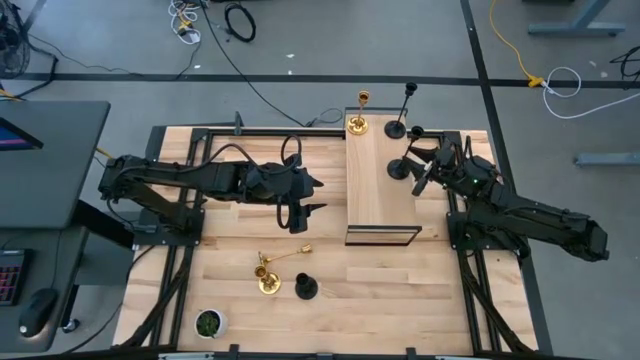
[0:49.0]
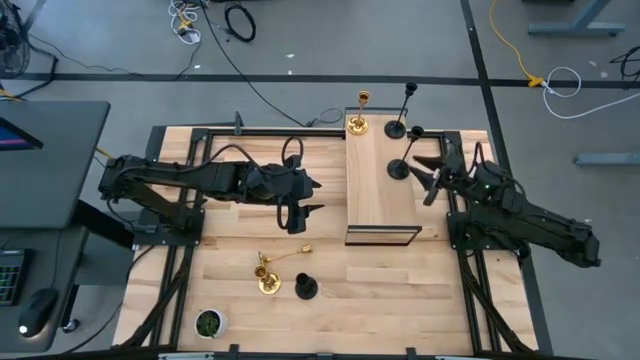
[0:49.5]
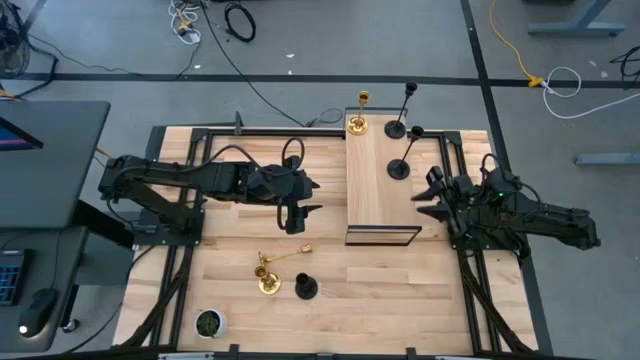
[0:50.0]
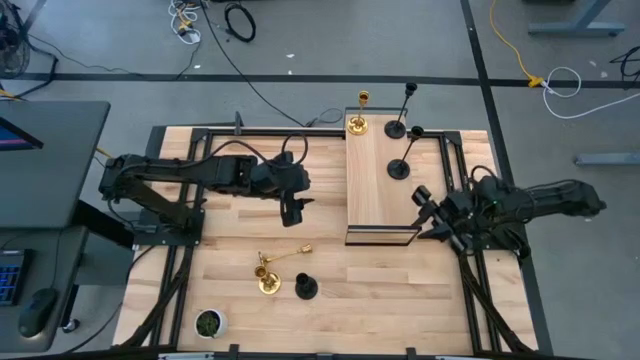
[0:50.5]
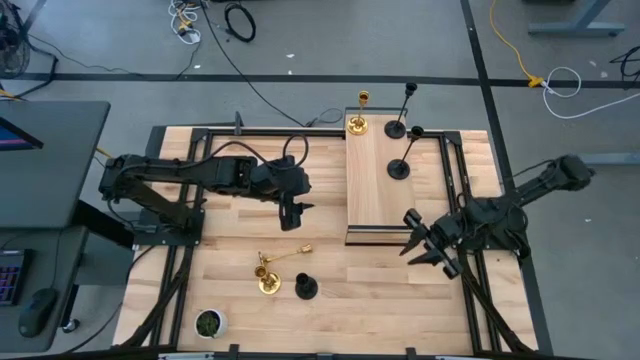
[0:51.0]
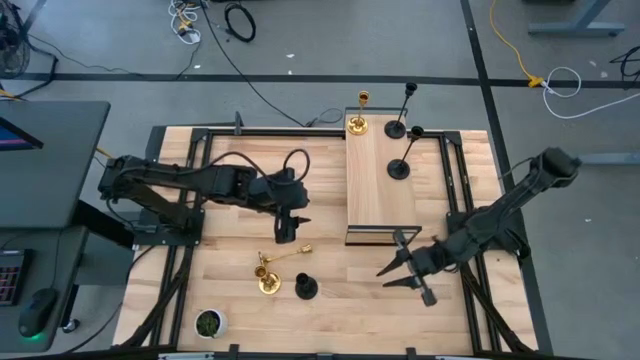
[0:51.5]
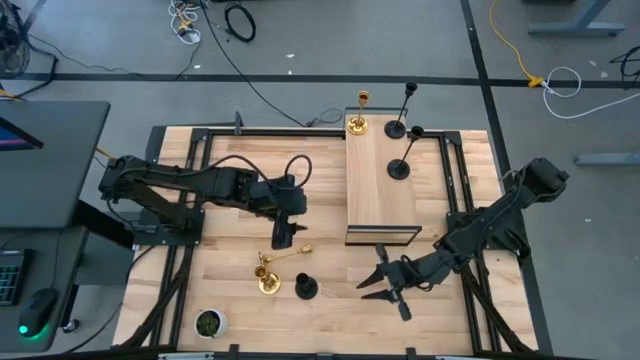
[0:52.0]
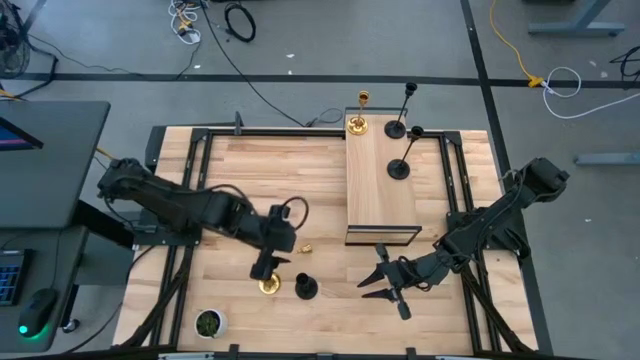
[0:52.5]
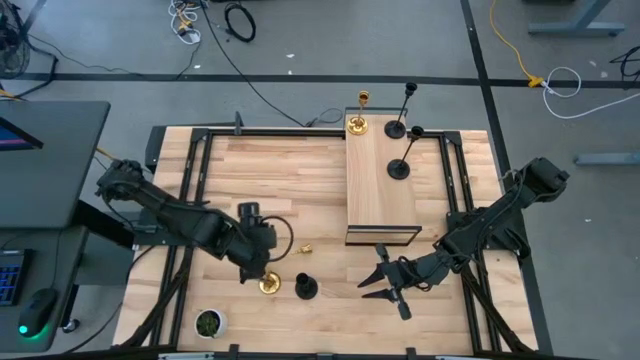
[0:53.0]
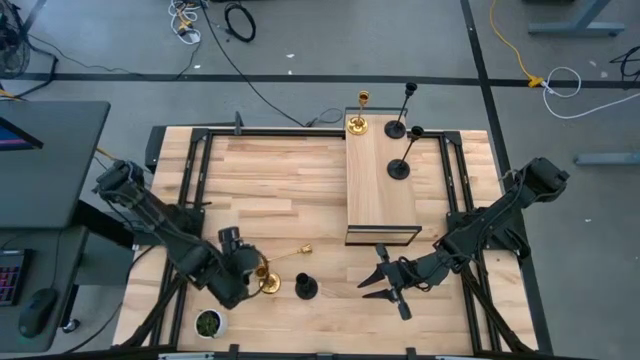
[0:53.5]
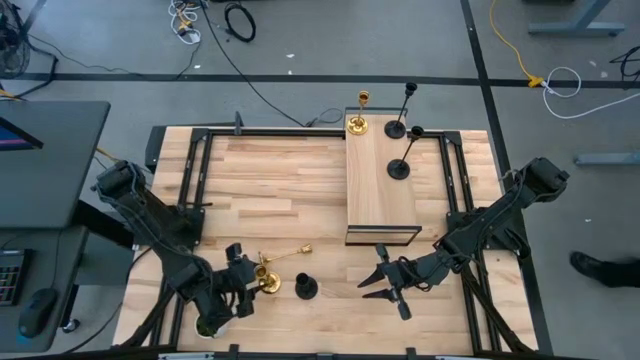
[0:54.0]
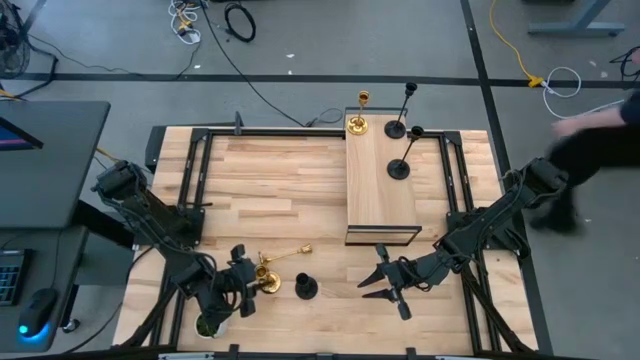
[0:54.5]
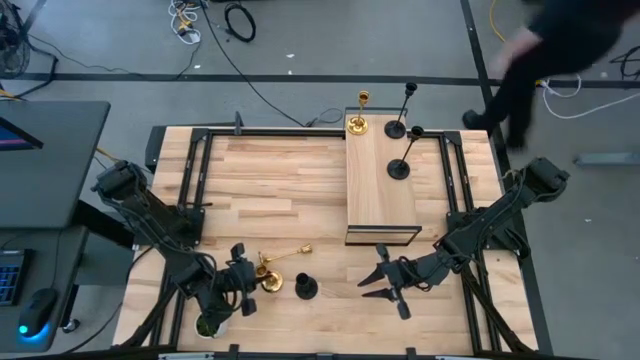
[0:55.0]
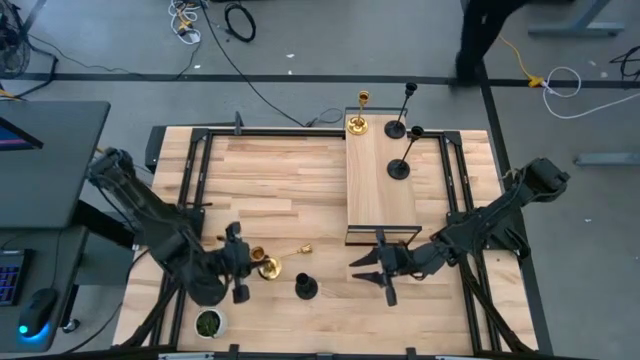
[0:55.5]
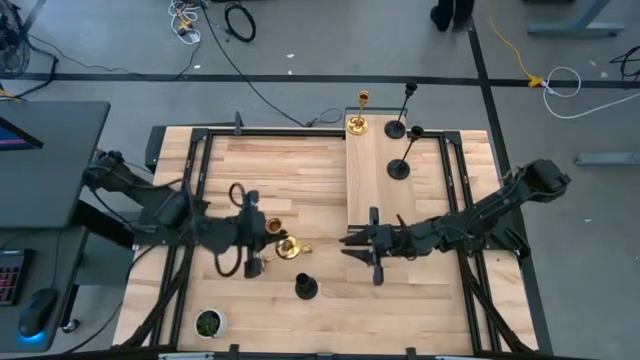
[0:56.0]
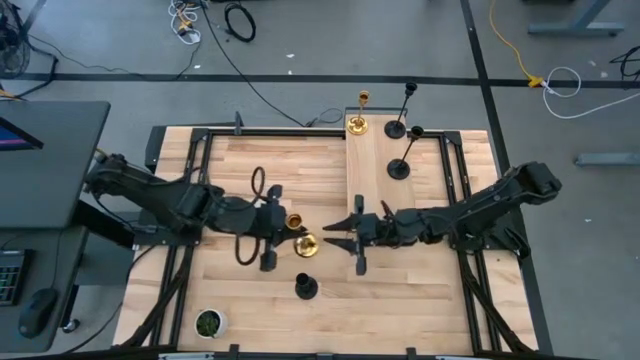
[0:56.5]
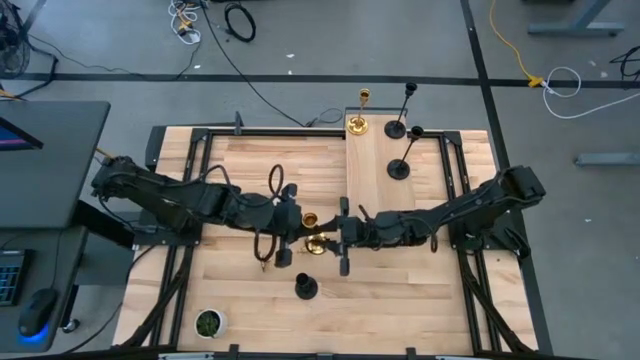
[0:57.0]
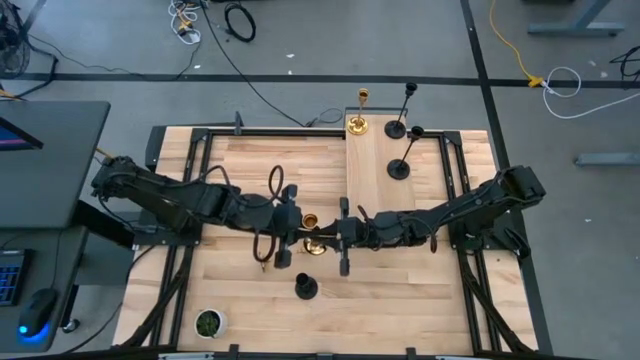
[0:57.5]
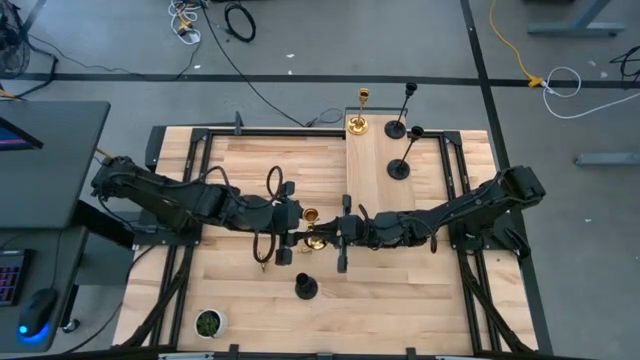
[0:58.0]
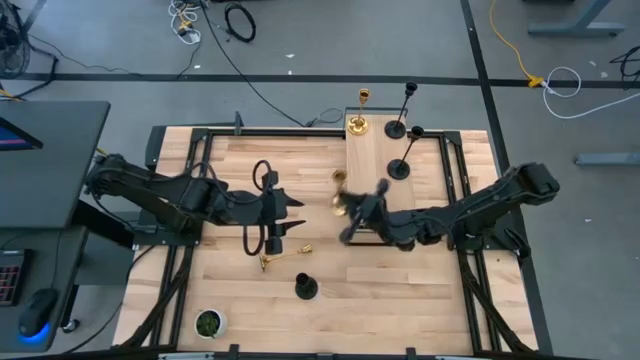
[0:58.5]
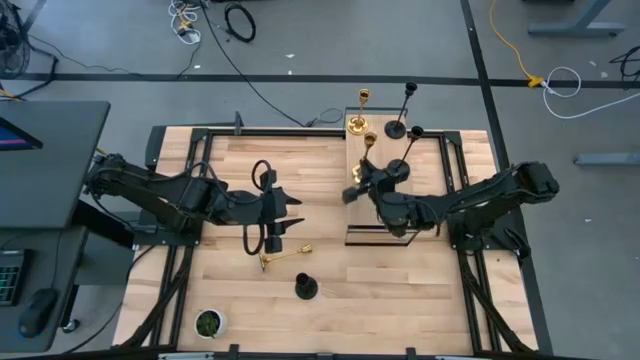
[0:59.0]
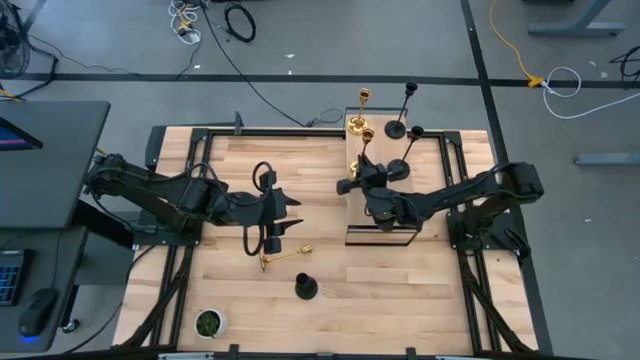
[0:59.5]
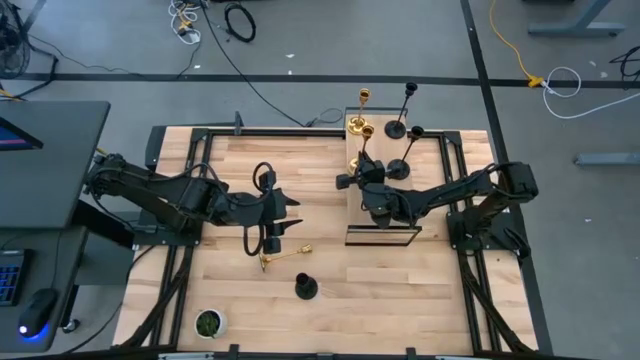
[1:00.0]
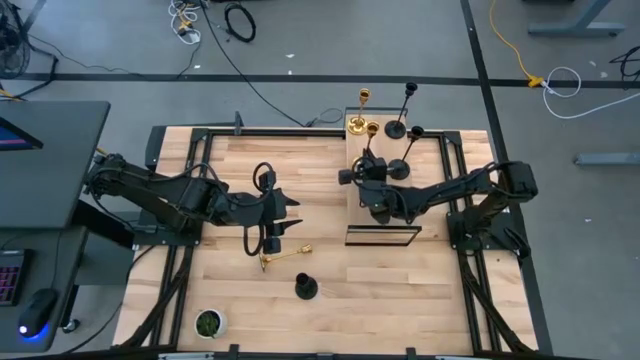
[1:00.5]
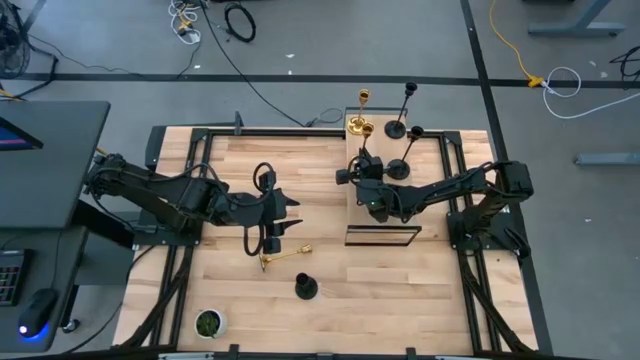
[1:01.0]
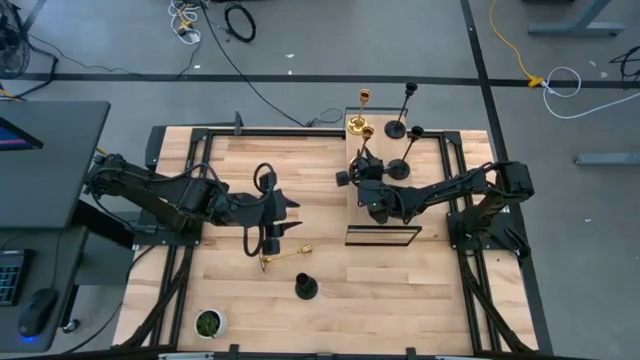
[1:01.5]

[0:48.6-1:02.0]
Task: Pick & Place candle stick holders
Put the bottom gold candleholder on the shelf aligned with the other gold candleholder

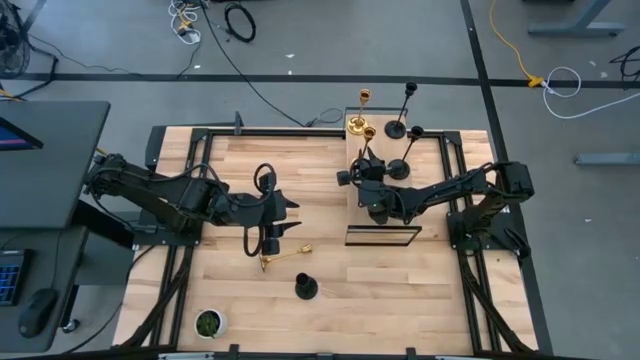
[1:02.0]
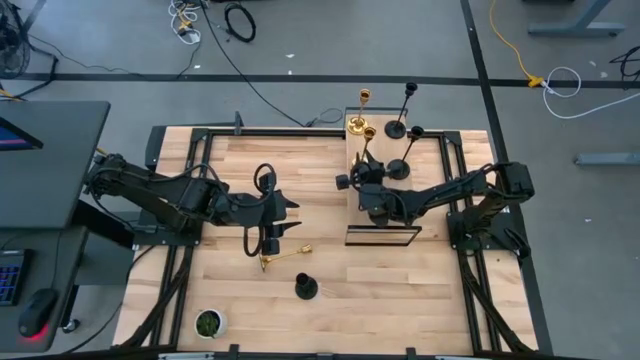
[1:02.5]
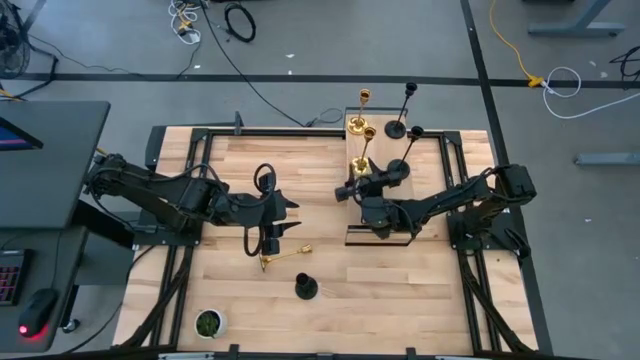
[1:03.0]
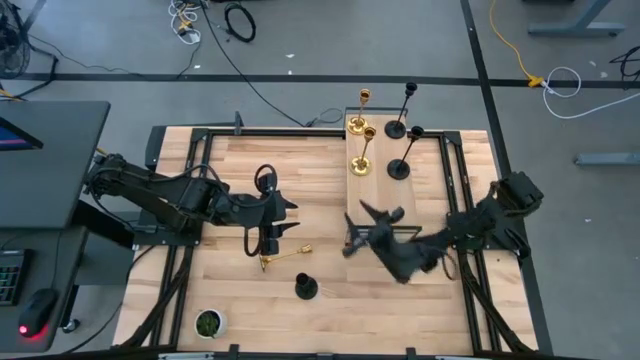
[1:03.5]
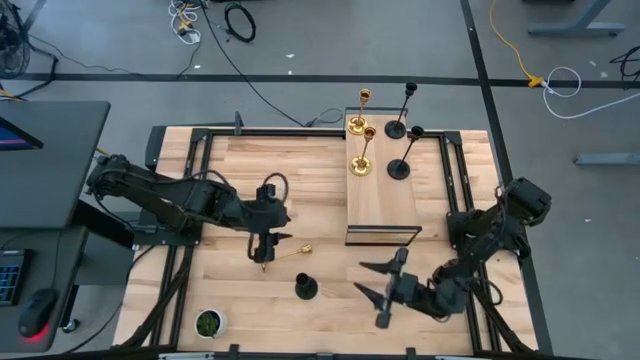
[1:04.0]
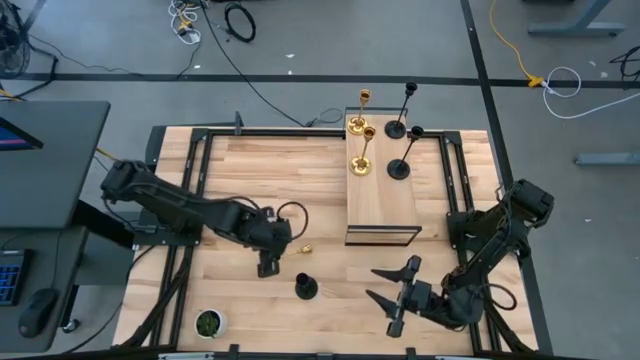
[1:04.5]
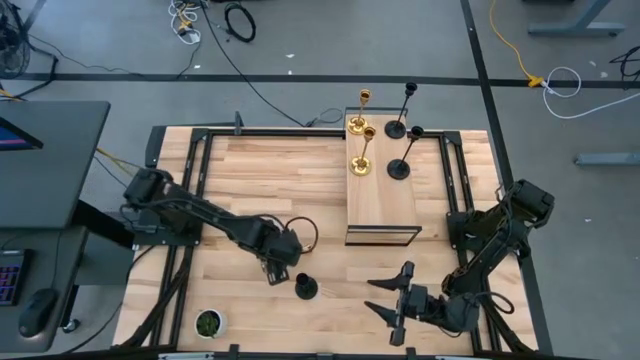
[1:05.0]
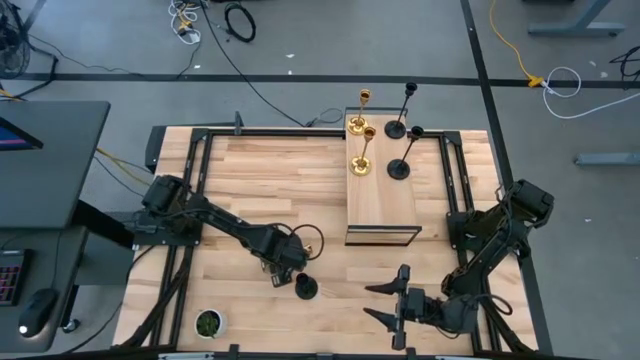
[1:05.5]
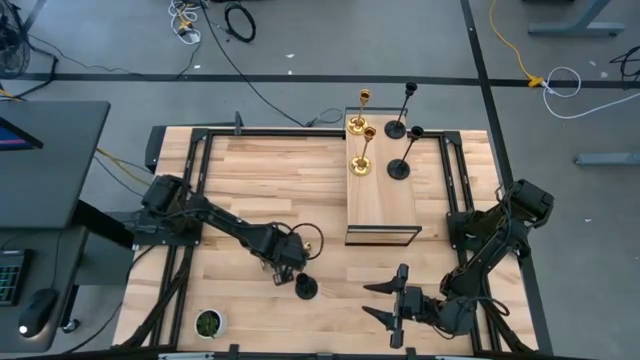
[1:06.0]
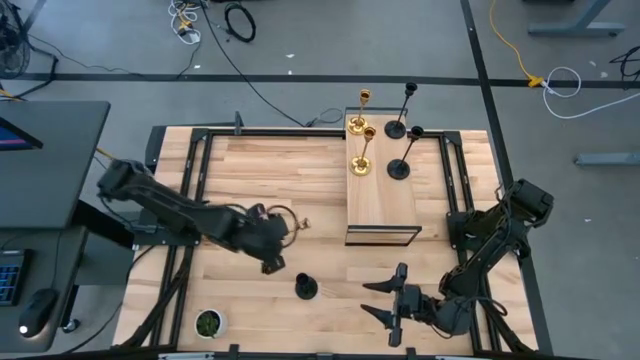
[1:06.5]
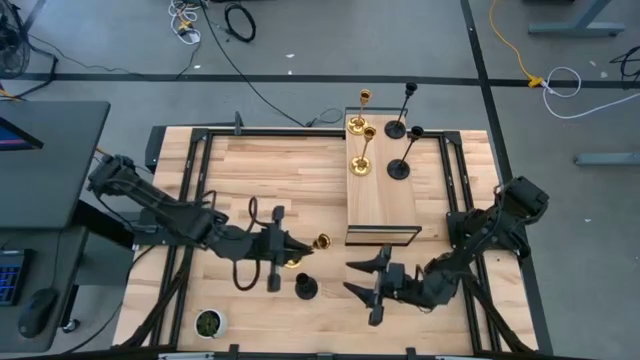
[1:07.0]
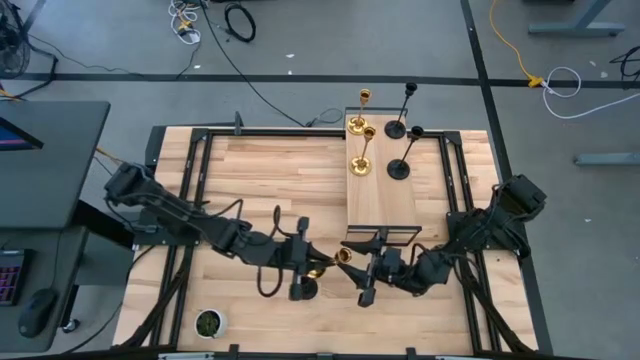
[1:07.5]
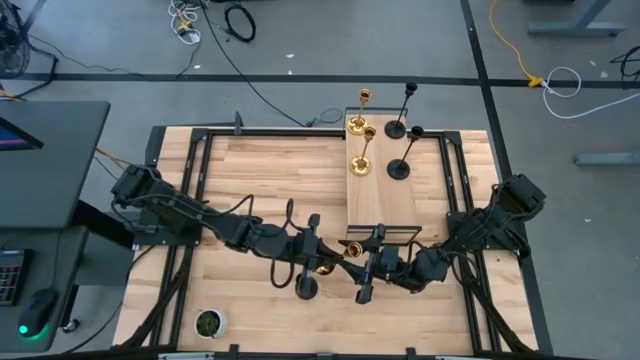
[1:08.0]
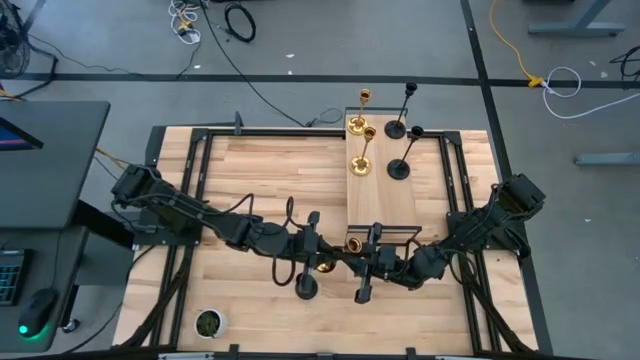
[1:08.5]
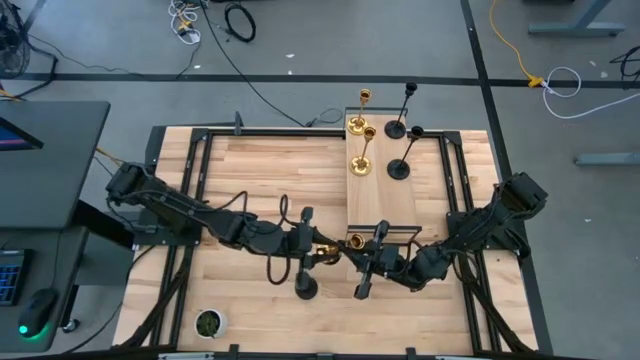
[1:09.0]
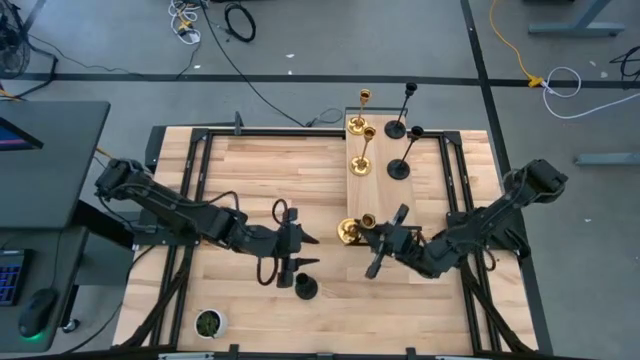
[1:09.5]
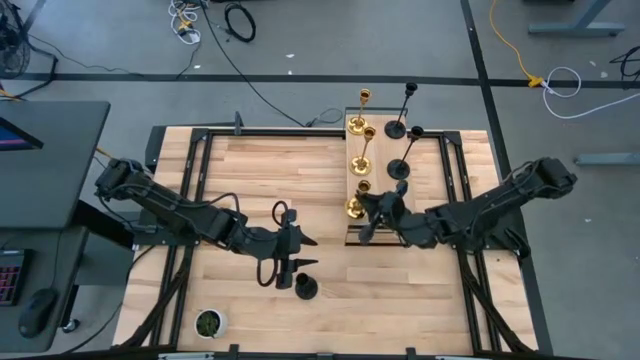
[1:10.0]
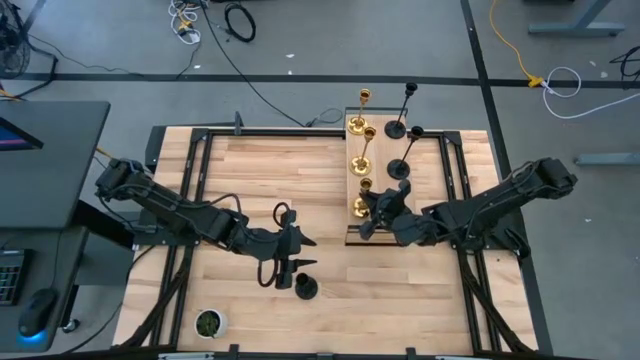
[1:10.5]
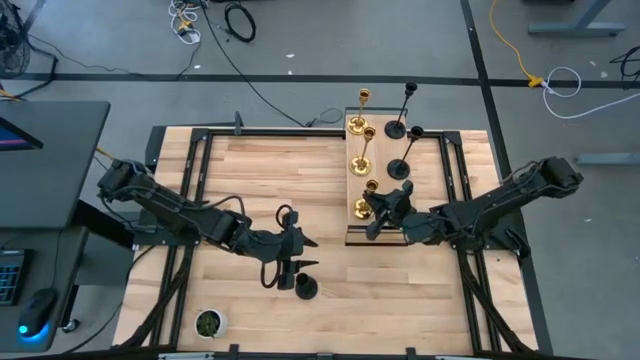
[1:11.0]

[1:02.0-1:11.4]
Put the gold candleholder on the shelf aligned with the other gold candleholders
